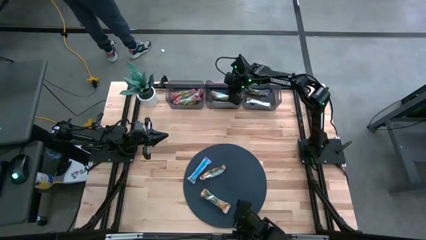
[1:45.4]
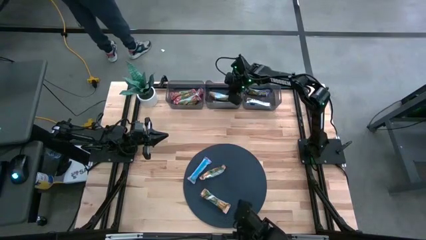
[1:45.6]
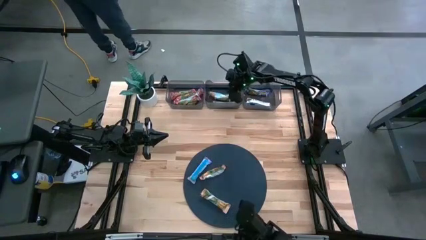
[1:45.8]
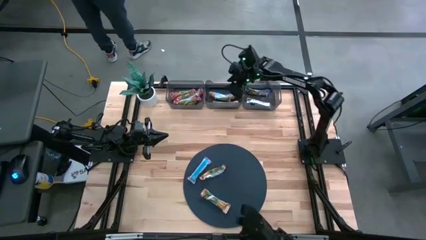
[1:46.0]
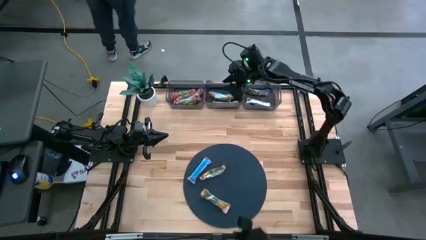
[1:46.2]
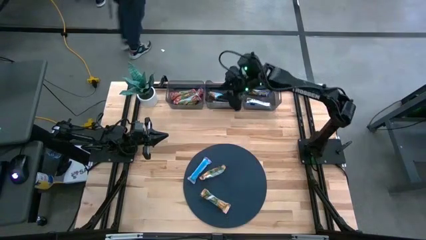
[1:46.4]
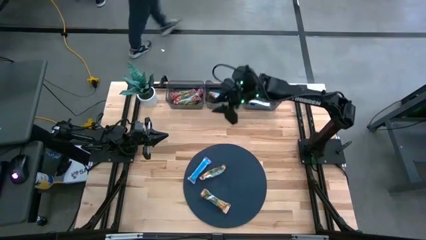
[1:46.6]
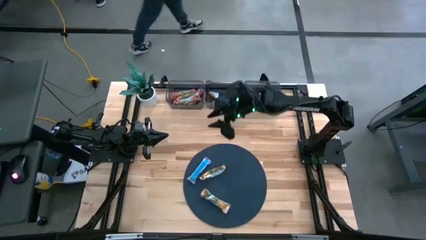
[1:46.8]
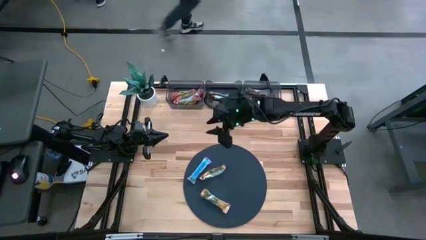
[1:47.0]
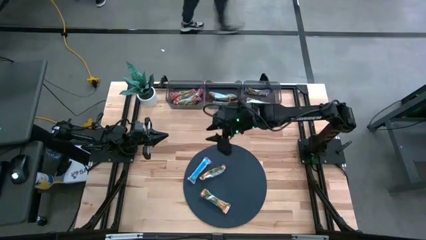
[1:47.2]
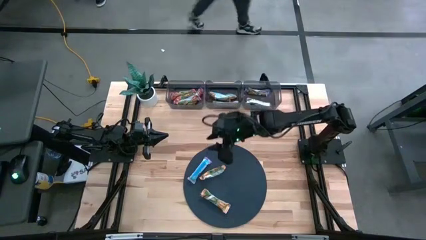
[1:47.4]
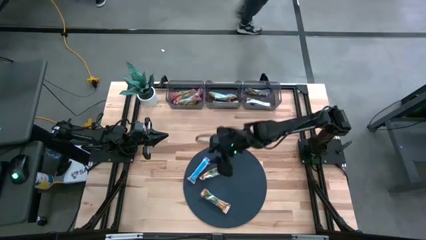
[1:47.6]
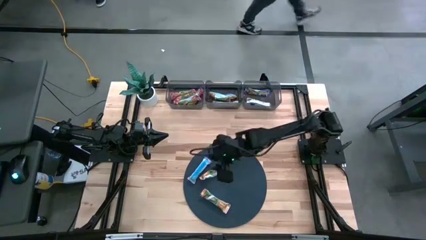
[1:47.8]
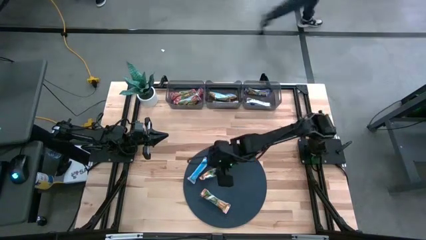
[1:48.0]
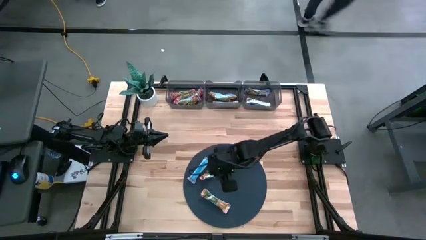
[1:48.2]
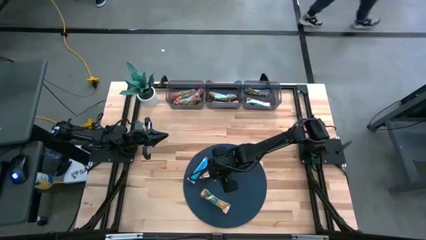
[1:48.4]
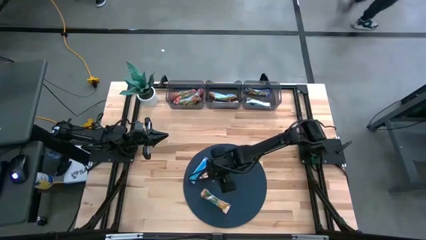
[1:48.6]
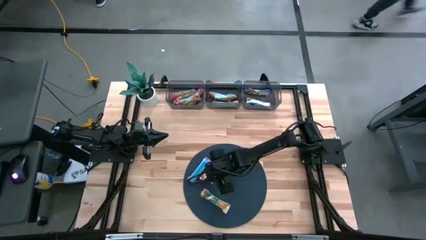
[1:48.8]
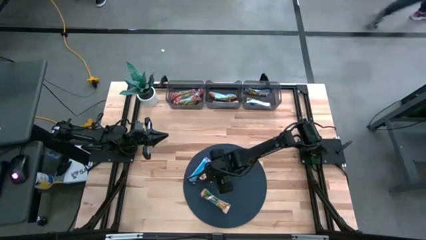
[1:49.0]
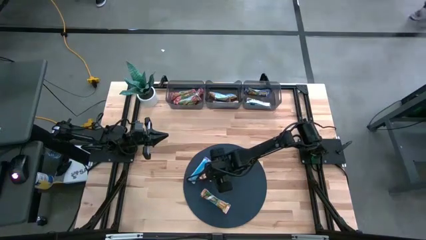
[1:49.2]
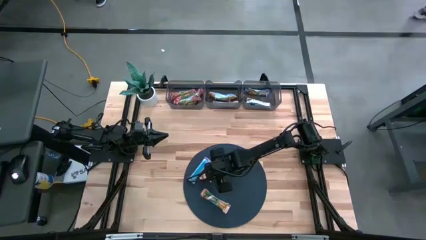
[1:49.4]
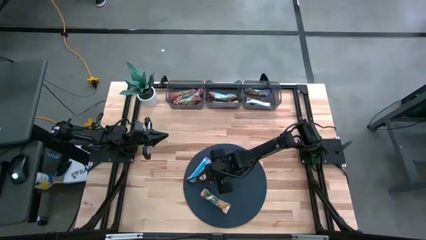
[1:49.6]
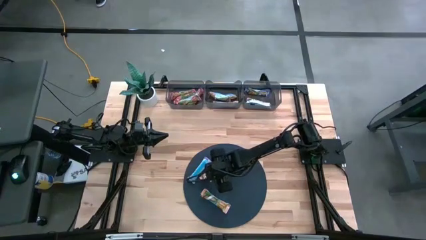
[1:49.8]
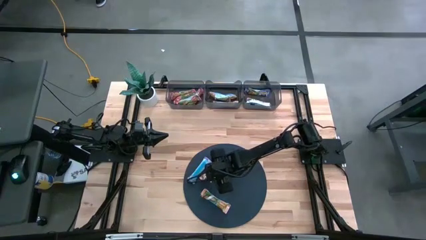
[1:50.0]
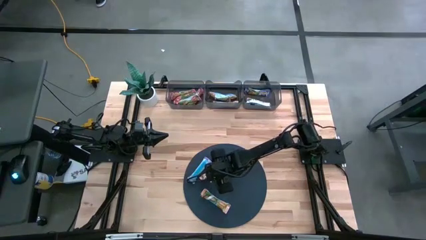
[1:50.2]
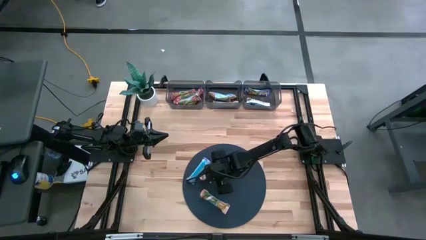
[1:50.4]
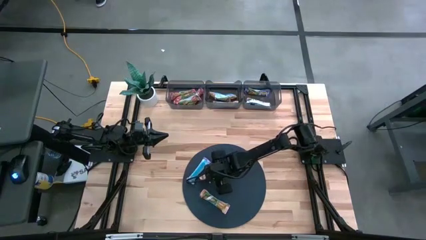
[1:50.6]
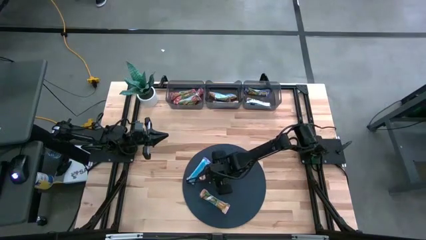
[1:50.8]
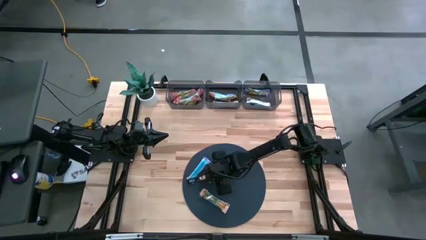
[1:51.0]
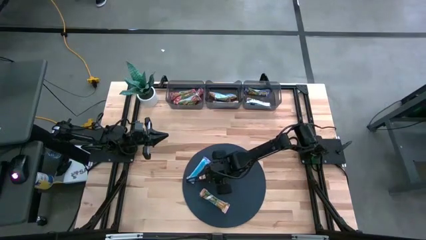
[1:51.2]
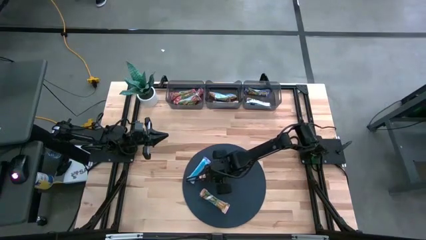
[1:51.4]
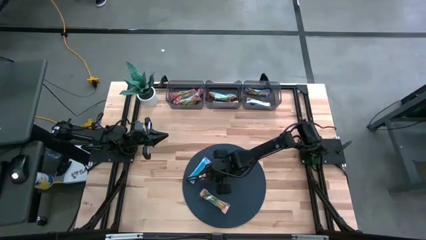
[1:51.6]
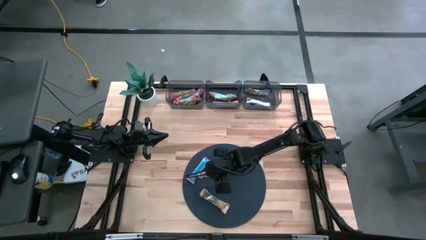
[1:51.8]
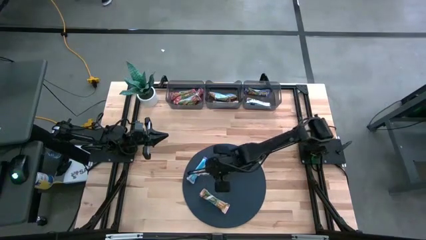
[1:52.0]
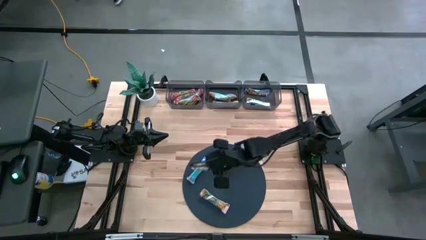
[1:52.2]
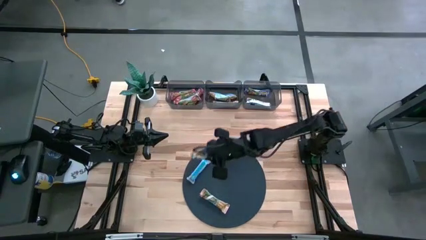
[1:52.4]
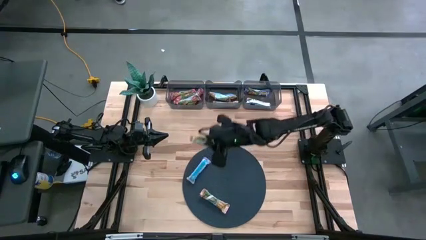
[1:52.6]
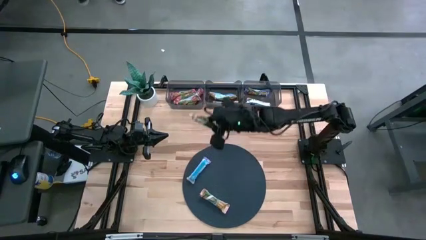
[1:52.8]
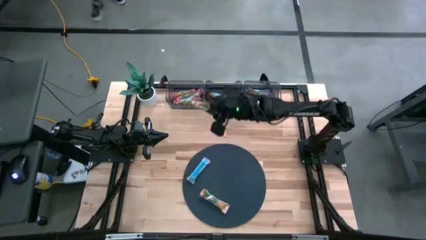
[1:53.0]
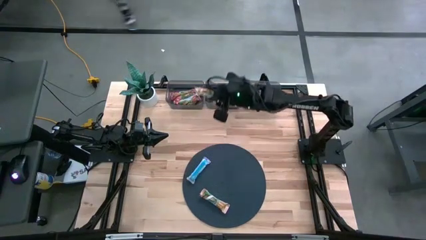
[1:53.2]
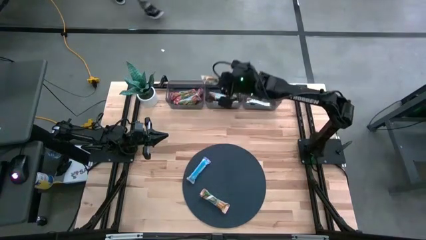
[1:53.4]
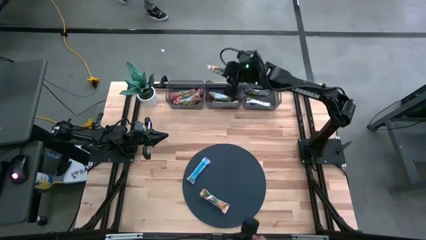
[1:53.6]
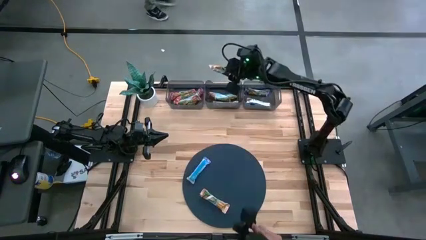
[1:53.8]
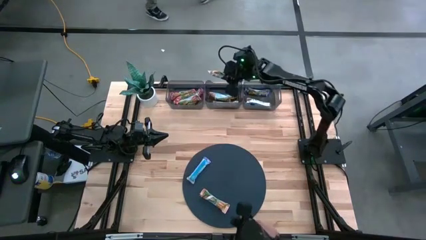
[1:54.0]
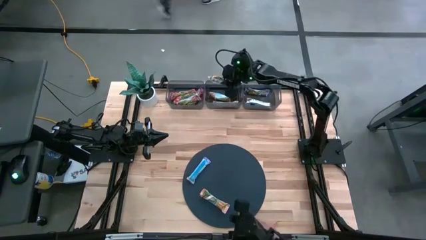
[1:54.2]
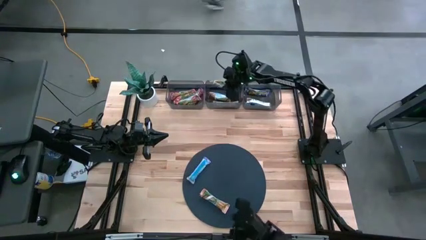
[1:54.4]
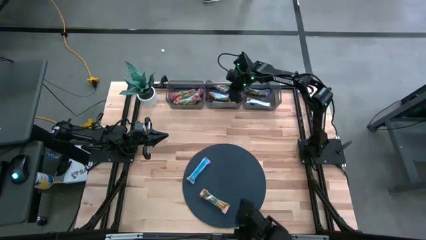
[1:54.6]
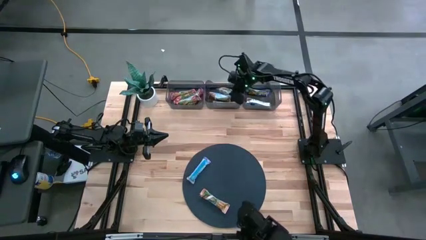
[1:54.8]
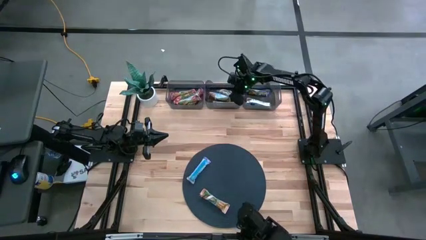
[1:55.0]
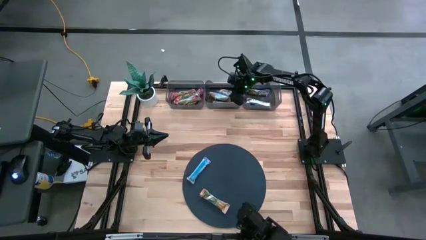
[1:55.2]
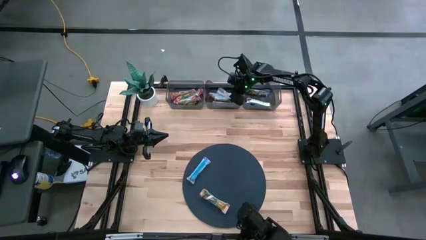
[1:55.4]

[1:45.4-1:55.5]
Task: Pick and place Granola Bars by type
Put the yellow granola bar into the middle black bin

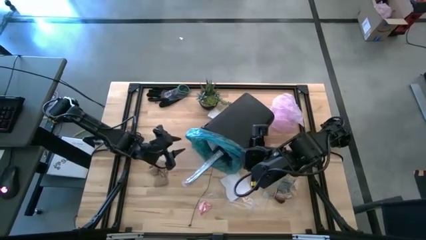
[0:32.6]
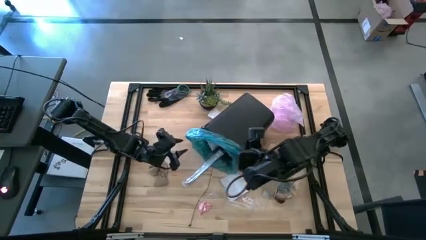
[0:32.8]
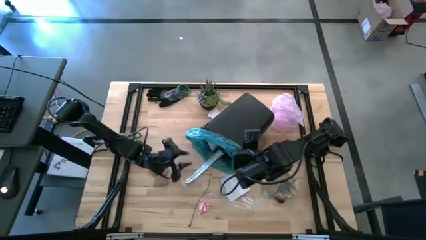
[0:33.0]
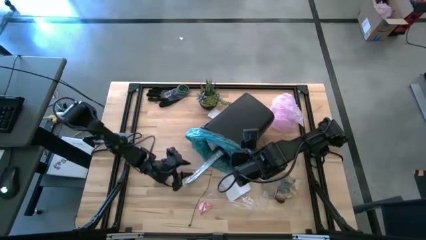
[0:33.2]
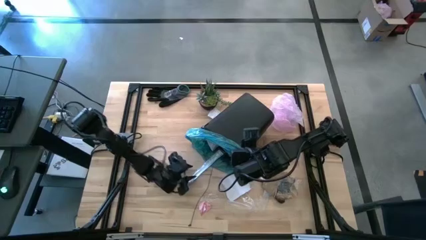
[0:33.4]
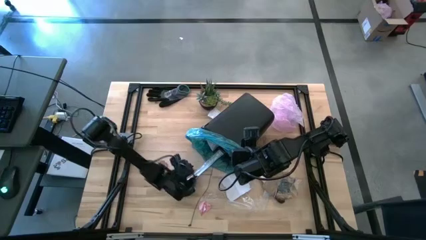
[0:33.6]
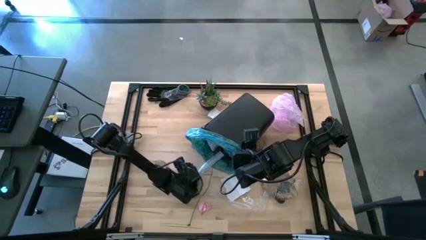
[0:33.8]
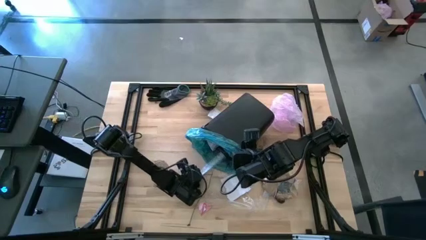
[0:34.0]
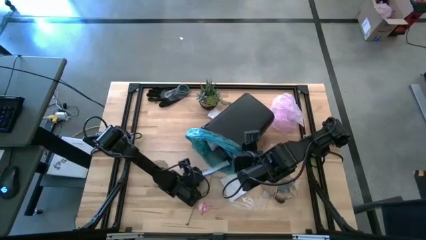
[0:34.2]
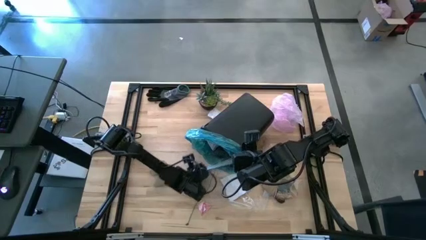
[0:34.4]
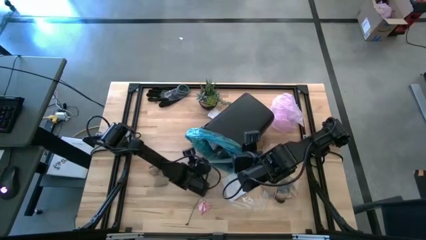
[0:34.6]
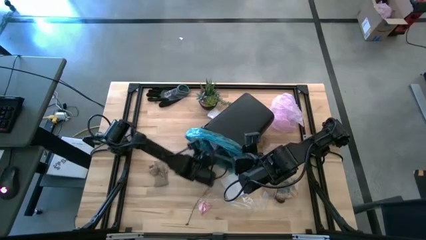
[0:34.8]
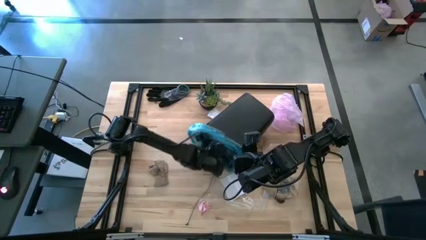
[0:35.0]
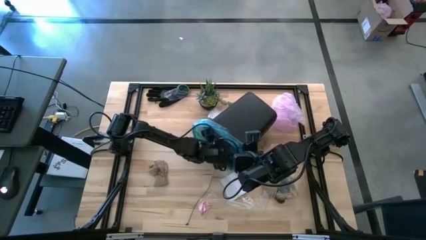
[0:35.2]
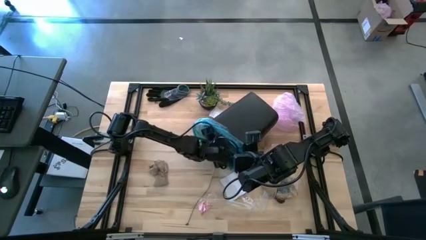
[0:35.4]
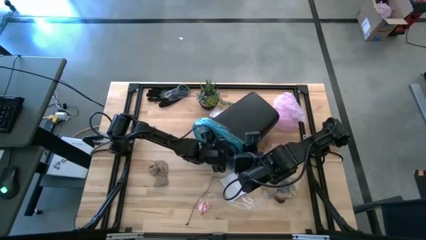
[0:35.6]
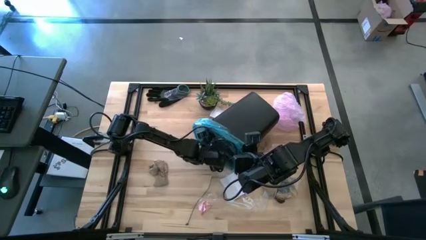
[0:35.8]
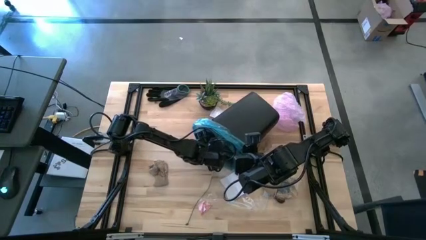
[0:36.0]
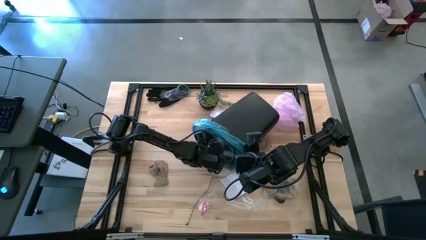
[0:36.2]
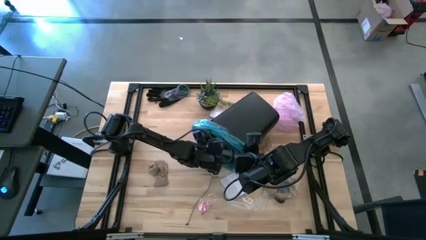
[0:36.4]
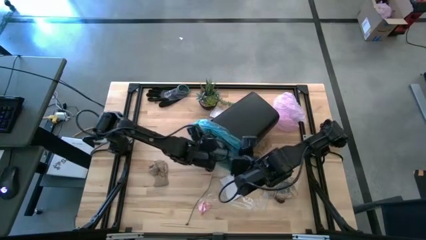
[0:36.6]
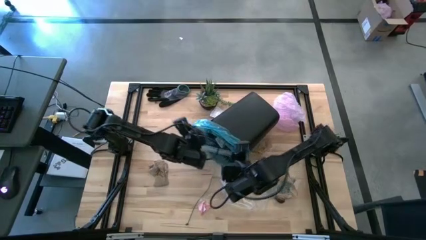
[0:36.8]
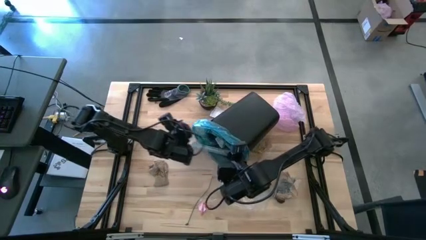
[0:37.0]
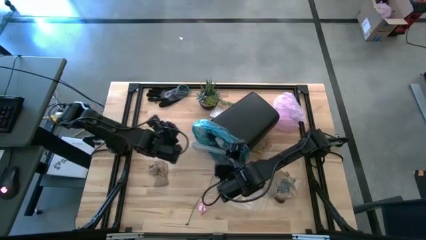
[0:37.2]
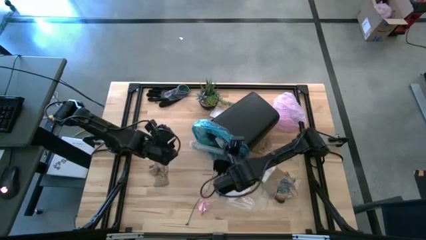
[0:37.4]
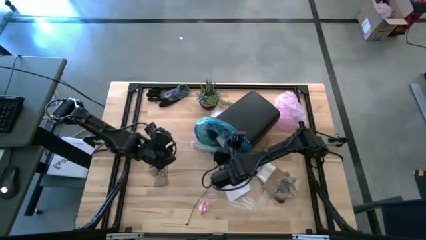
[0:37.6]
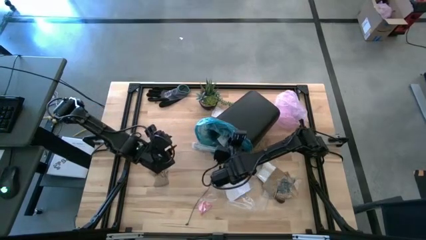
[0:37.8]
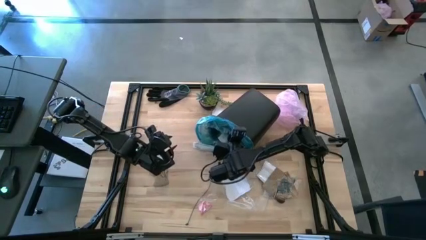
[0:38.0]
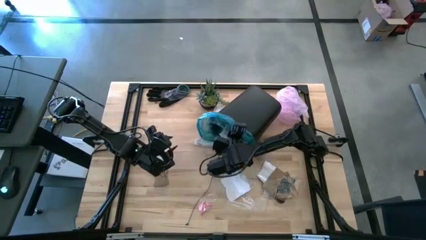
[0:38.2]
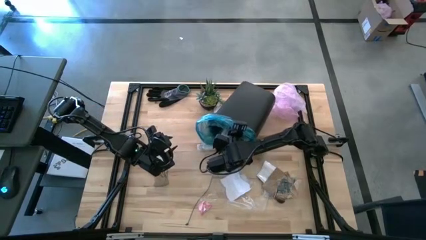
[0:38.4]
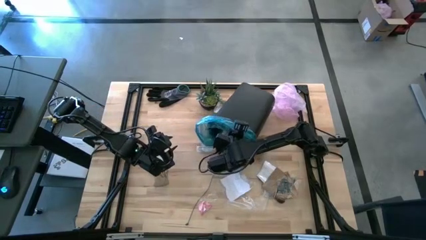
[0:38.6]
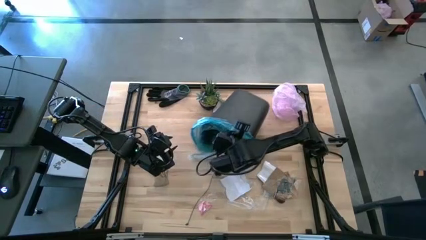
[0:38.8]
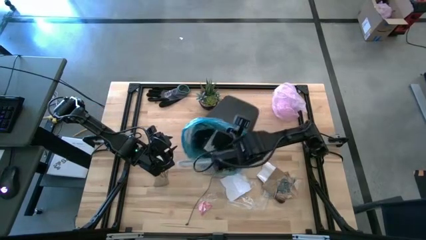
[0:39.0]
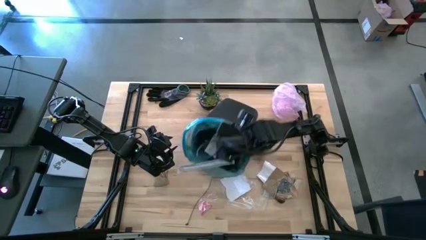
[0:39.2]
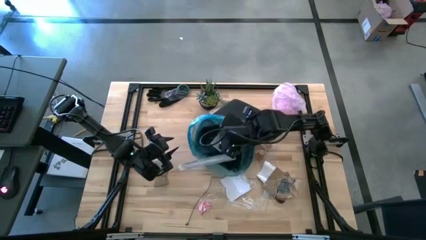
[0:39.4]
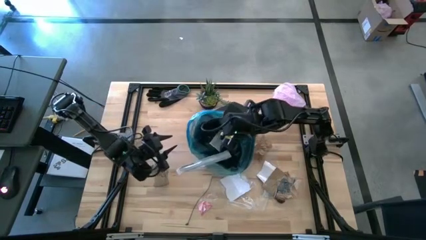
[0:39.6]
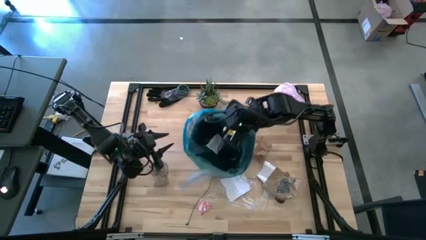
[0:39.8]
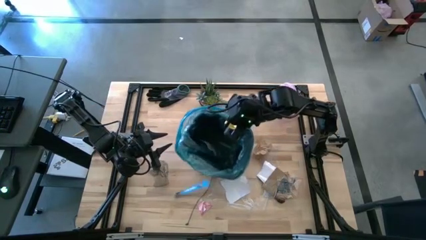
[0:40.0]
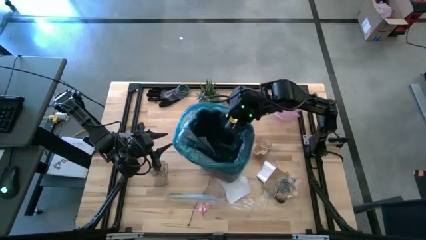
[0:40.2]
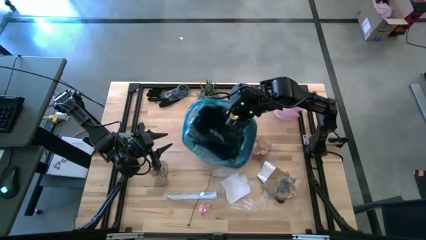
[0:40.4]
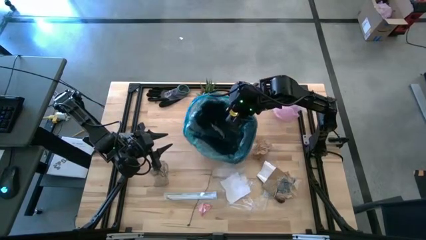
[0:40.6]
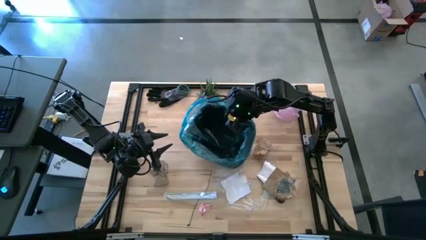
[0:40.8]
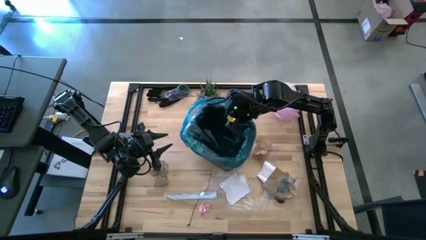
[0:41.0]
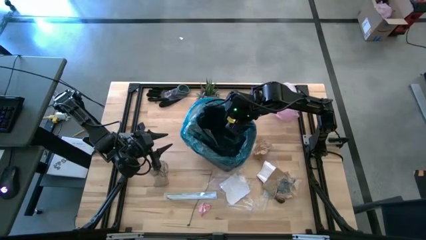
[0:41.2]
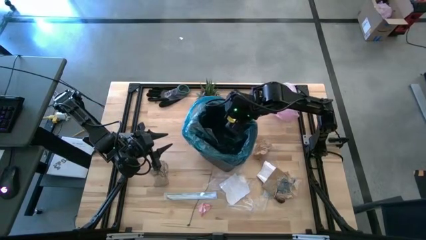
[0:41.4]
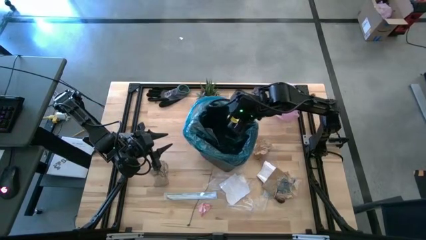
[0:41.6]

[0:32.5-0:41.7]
Task: place trash/remove bag and relplace
Adjust the trash bin
